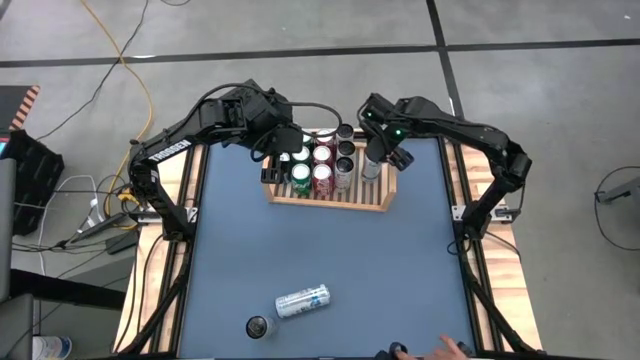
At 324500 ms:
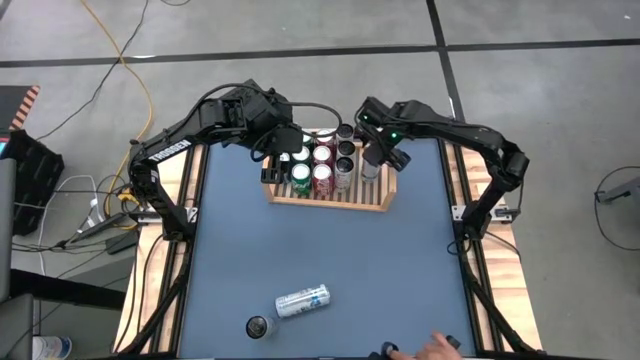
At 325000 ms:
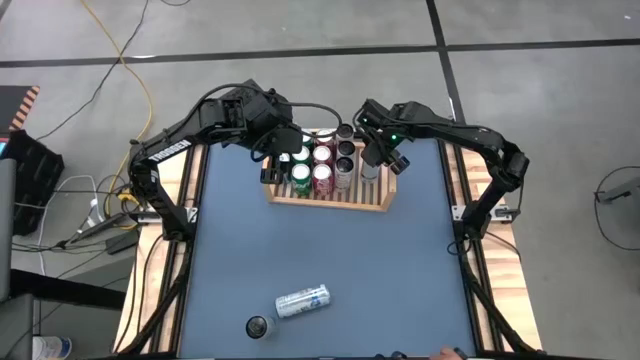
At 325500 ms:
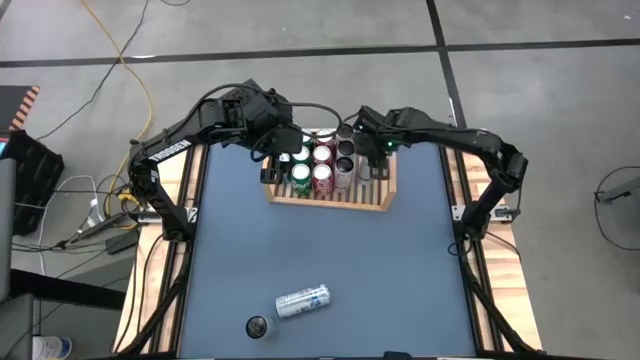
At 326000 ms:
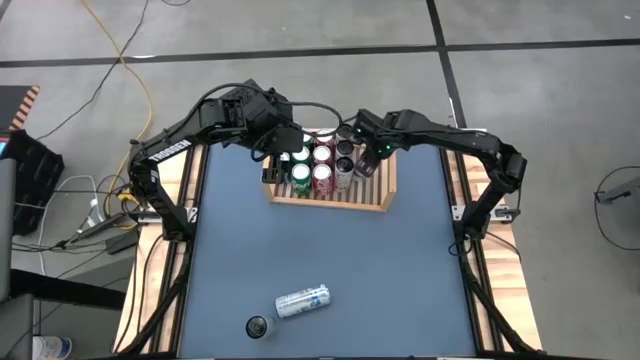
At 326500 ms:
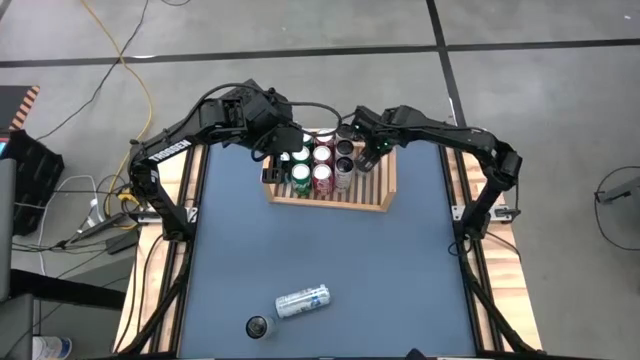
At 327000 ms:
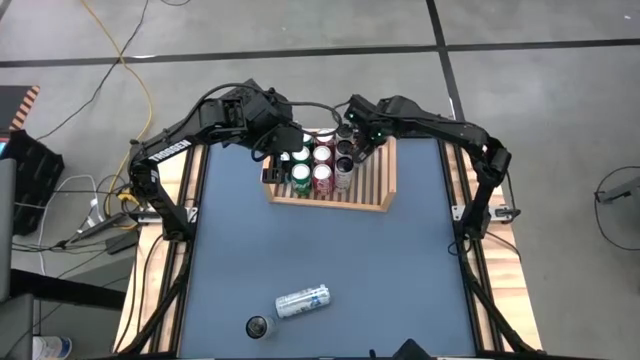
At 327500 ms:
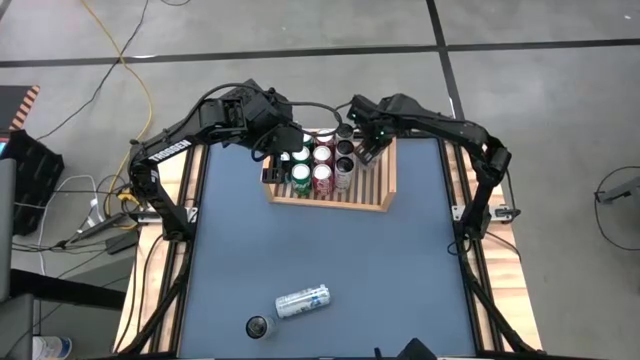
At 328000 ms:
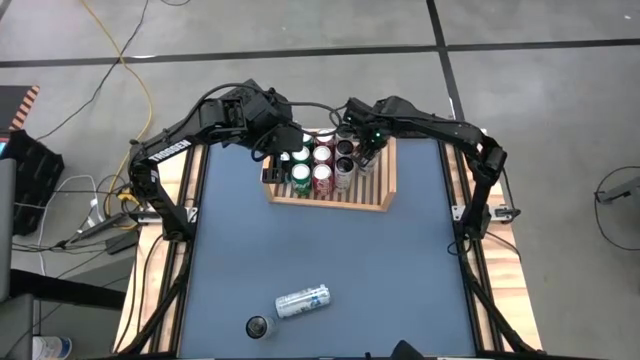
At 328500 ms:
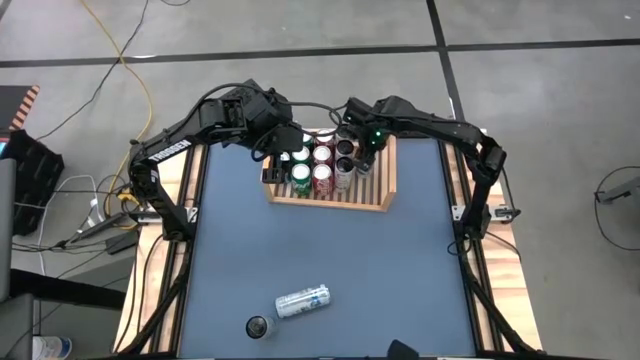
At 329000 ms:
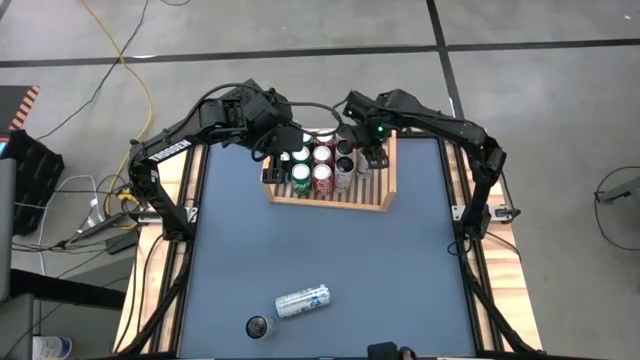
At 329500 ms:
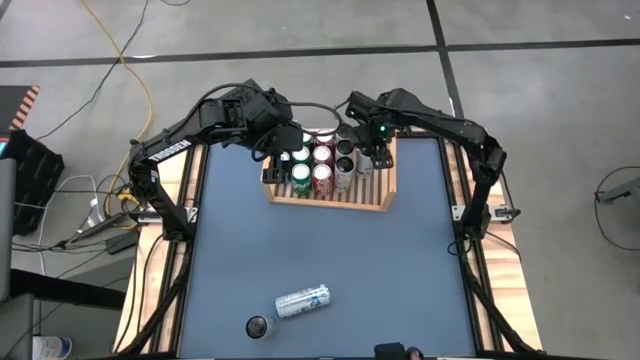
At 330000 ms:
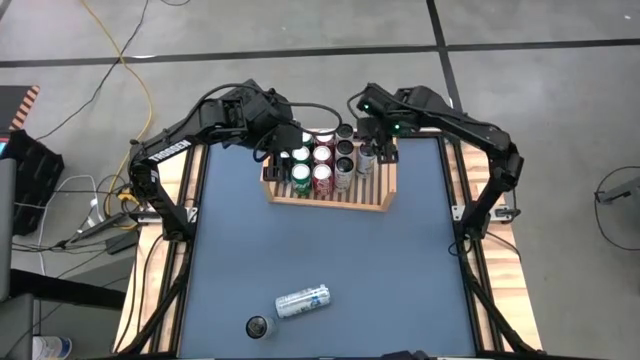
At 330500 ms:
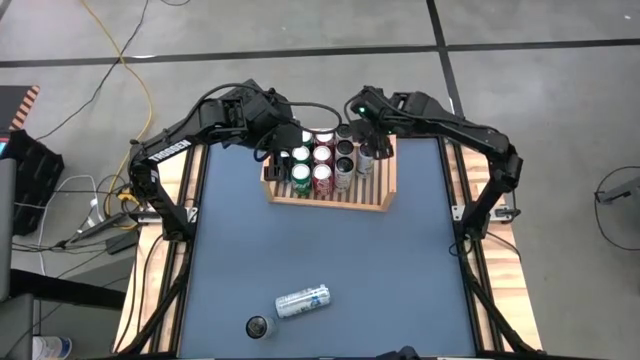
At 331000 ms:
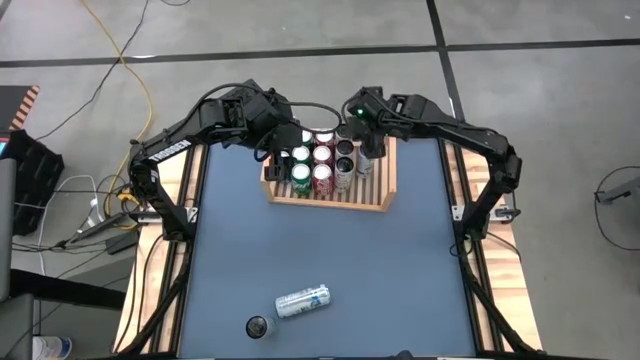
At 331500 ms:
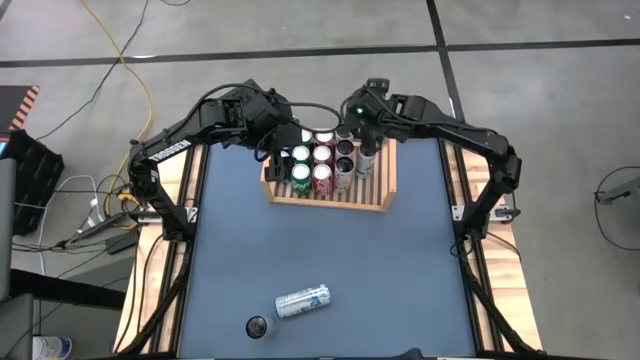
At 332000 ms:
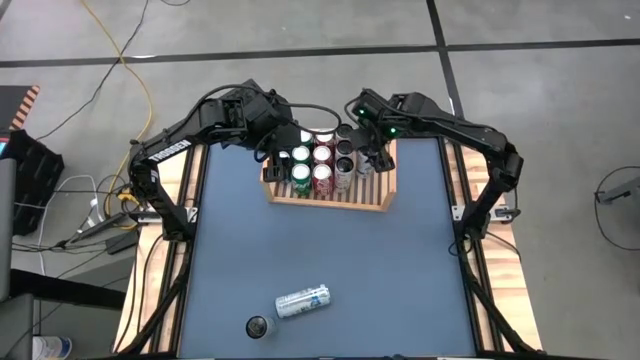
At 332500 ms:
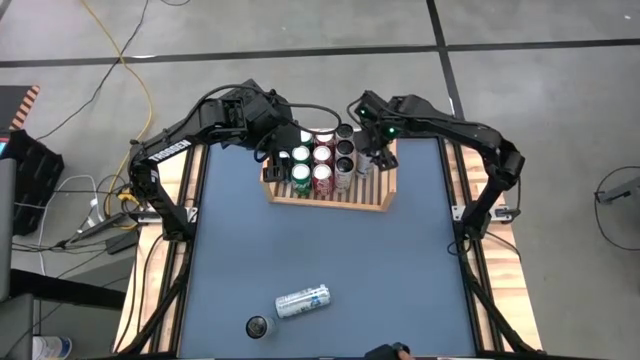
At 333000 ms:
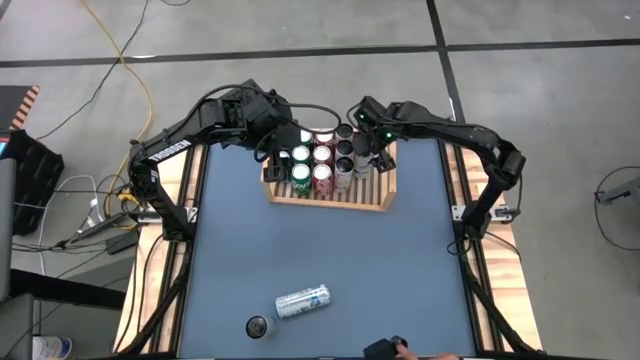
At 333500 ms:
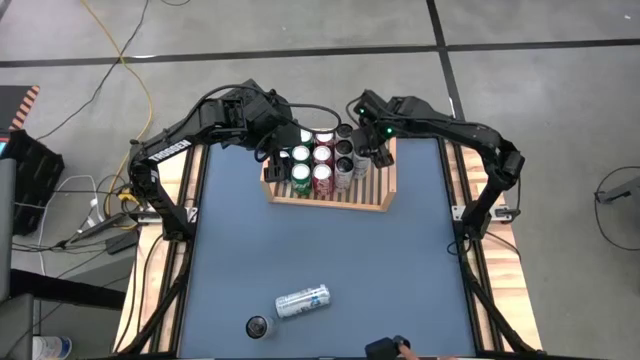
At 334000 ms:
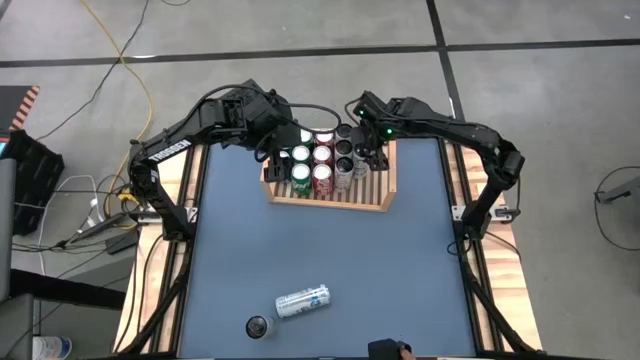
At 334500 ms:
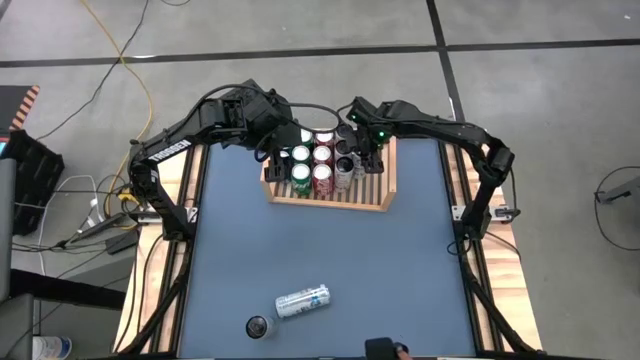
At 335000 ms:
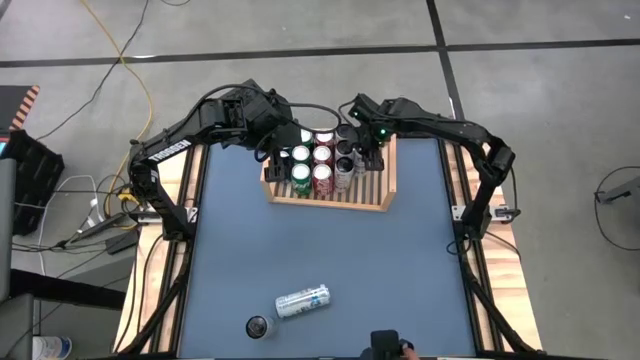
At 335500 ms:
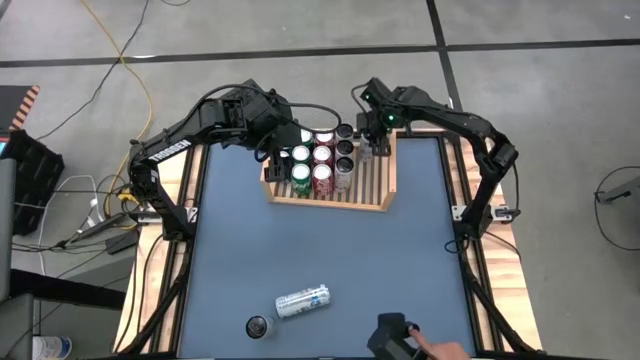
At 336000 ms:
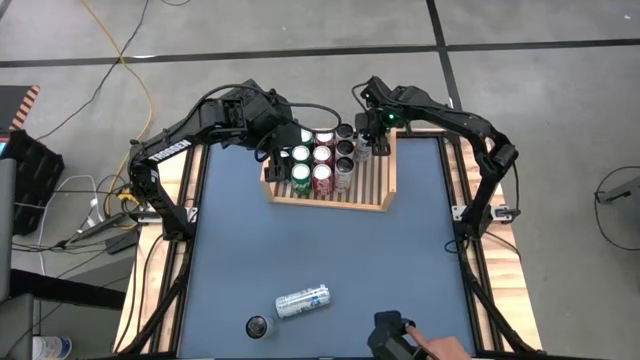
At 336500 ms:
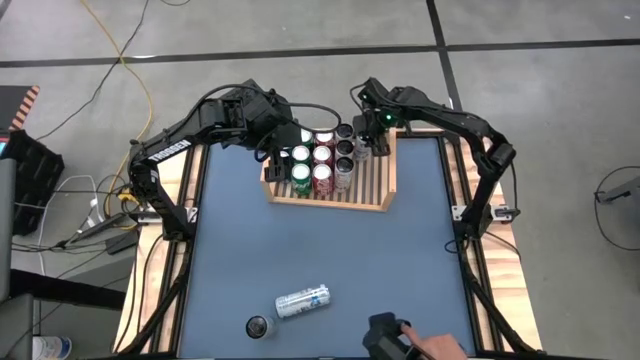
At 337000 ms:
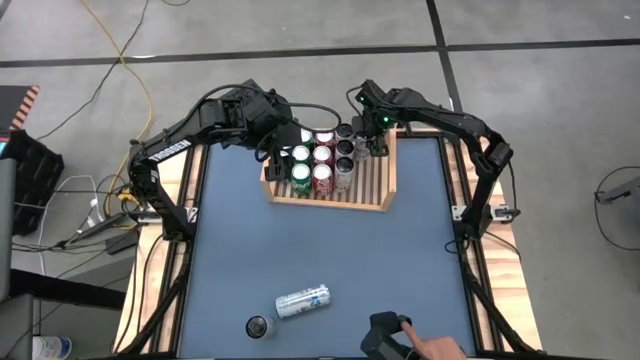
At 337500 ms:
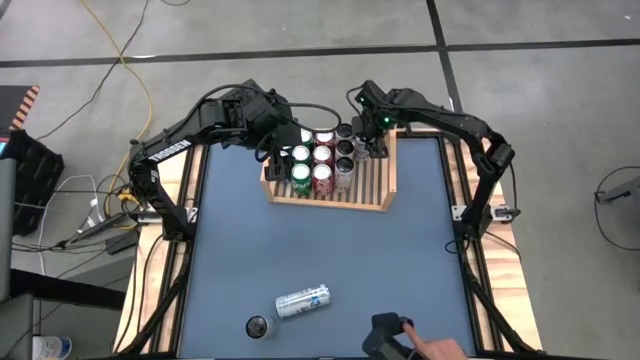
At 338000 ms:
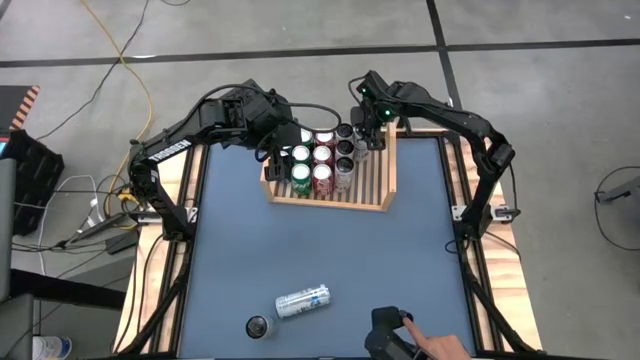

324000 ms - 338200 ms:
Task: Place canned beverage on shelf
Put the light blue soda can on the shelf

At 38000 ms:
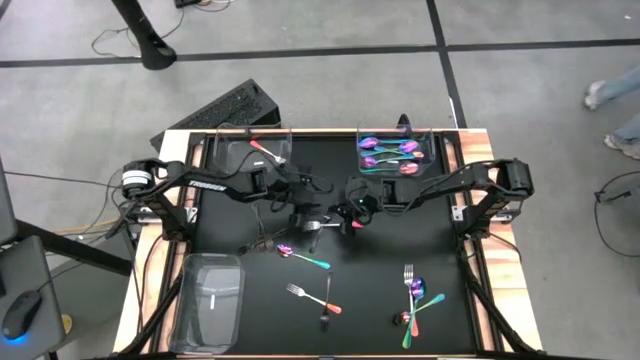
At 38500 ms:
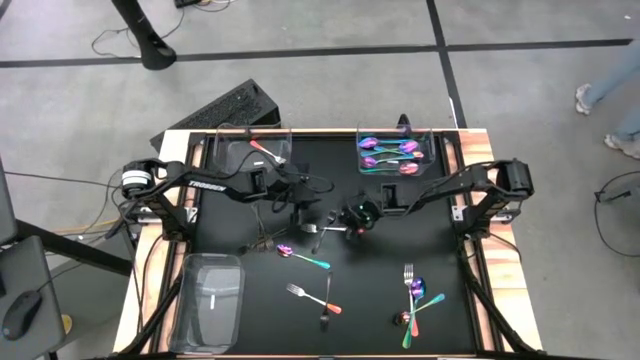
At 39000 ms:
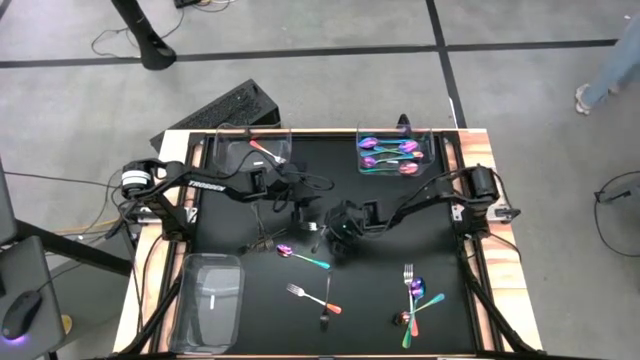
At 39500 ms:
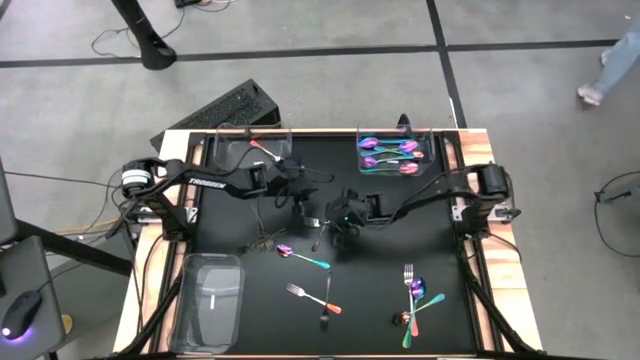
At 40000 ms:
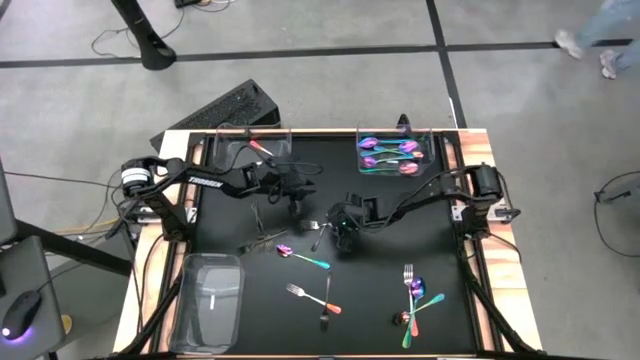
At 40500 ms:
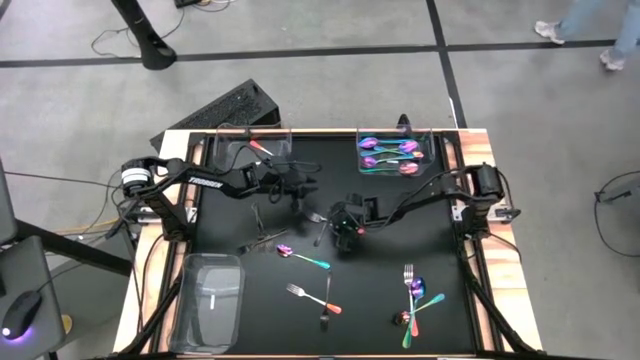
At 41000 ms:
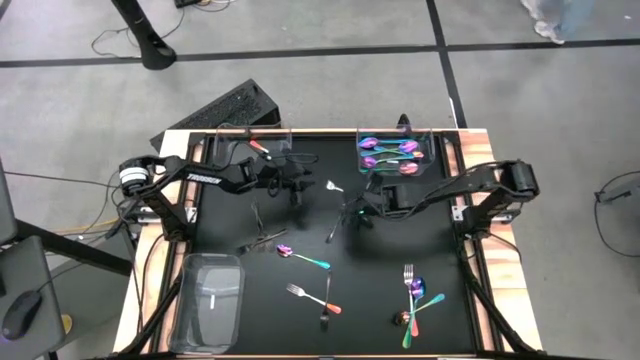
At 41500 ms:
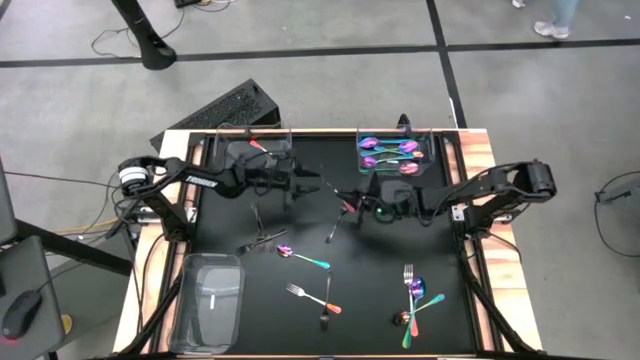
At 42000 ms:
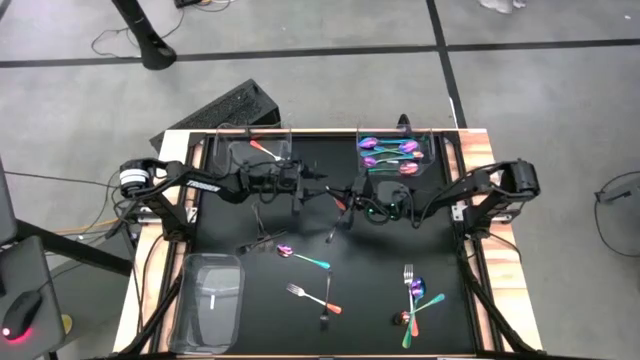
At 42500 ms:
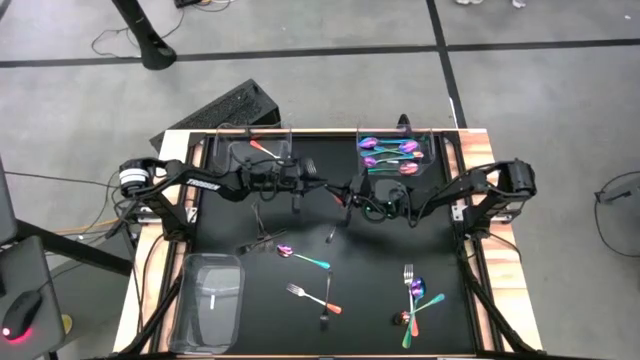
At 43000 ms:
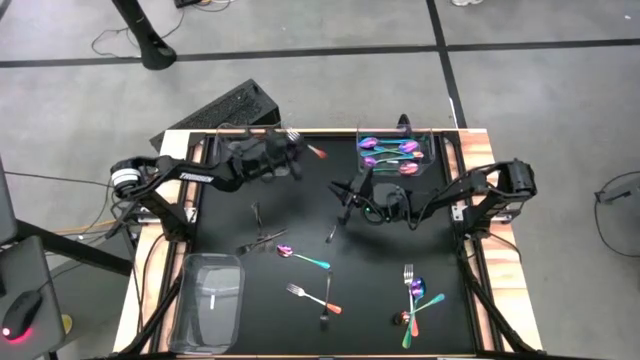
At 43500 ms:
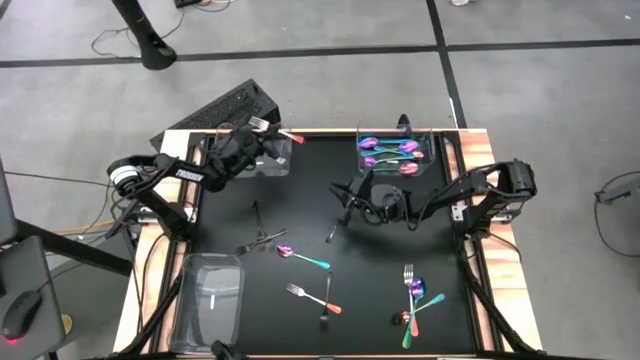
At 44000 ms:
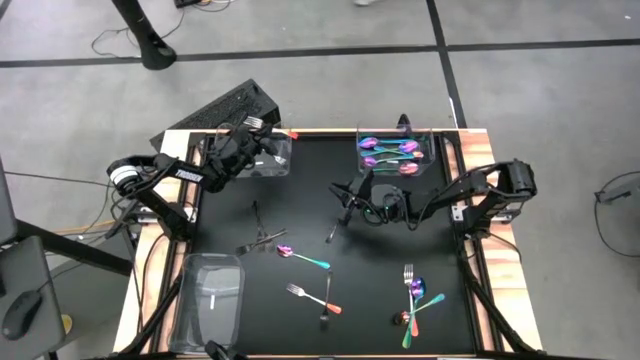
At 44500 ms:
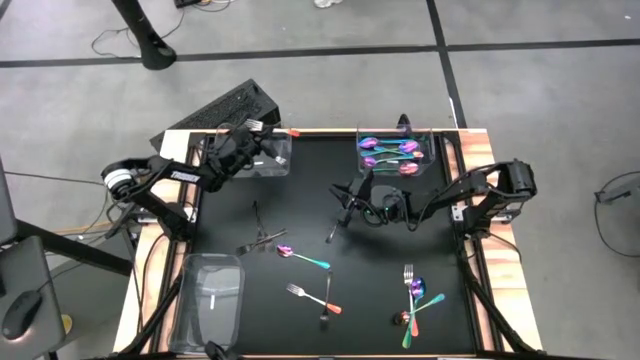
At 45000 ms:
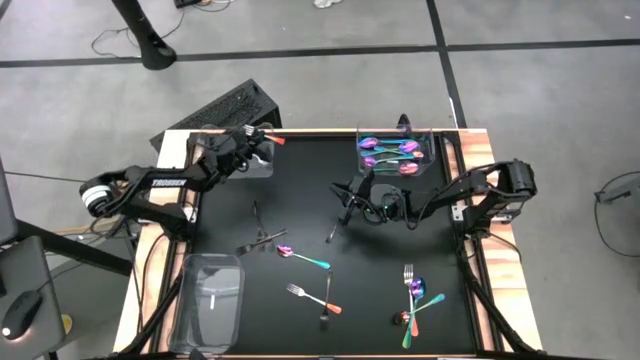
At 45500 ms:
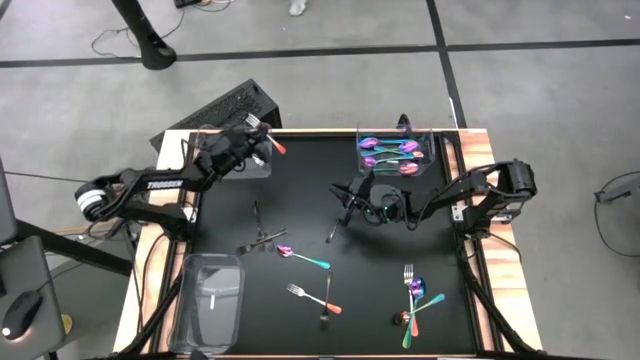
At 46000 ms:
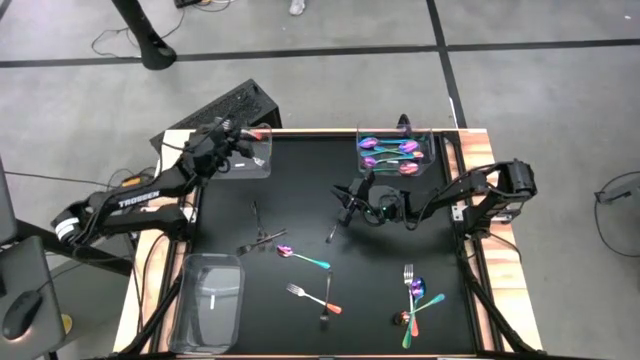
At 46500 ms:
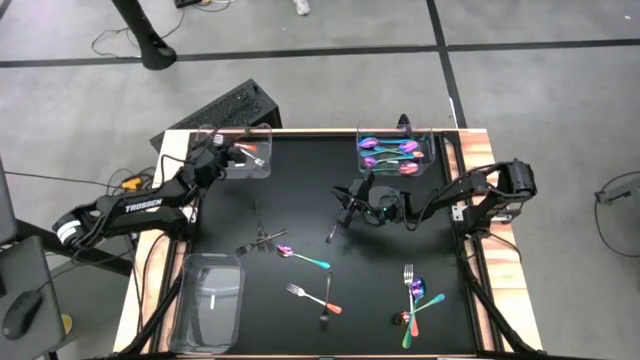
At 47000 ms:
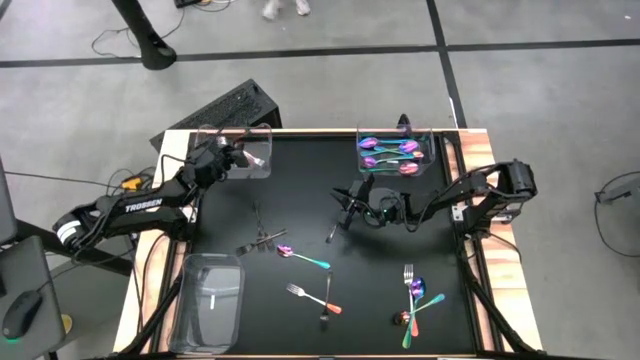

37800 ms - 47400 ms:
Task: Sort silverware by color (type)
Put the orange fork into top left transparent bin
